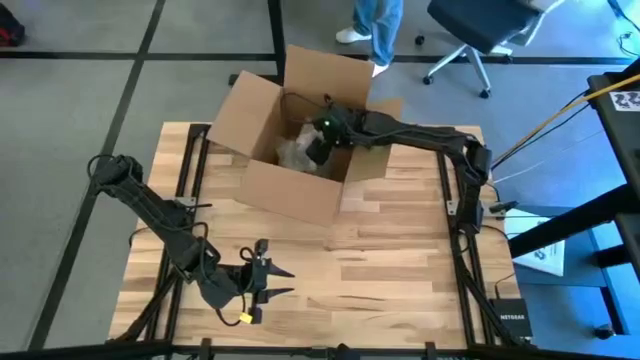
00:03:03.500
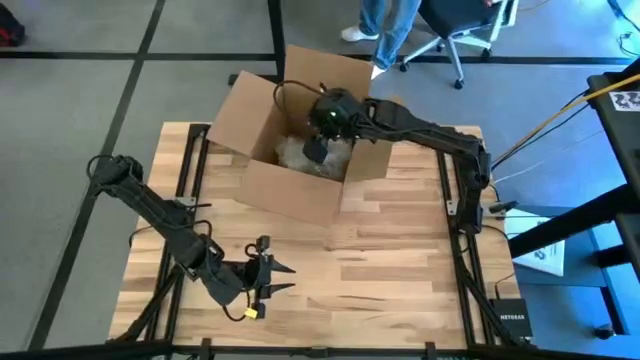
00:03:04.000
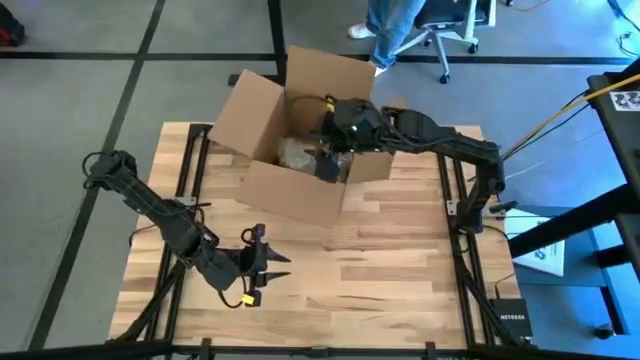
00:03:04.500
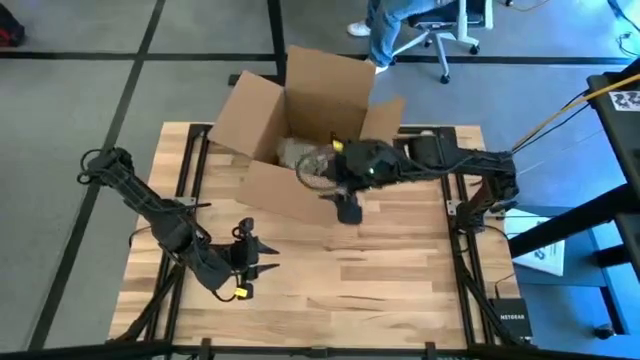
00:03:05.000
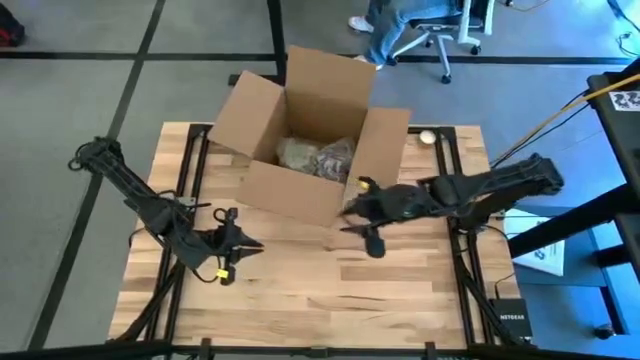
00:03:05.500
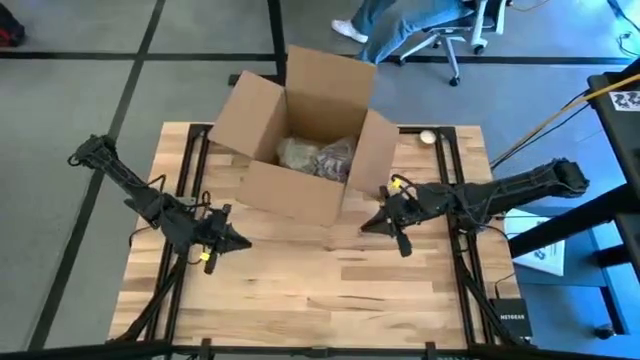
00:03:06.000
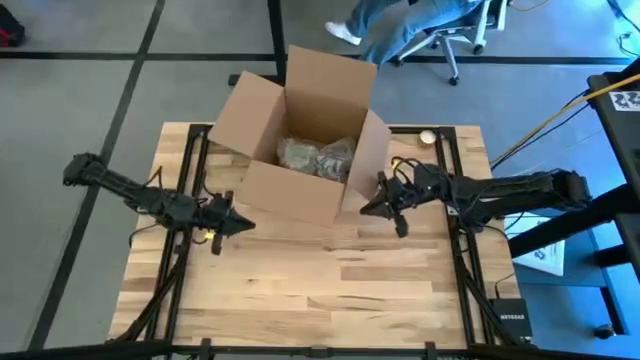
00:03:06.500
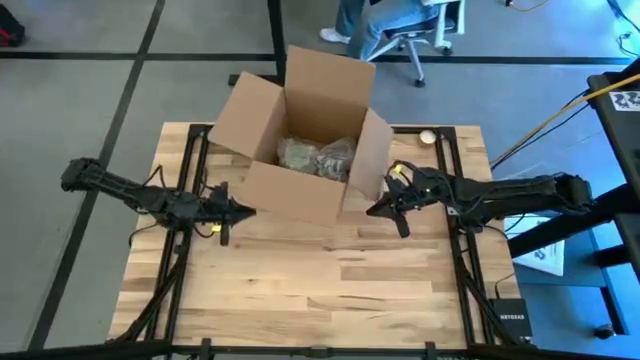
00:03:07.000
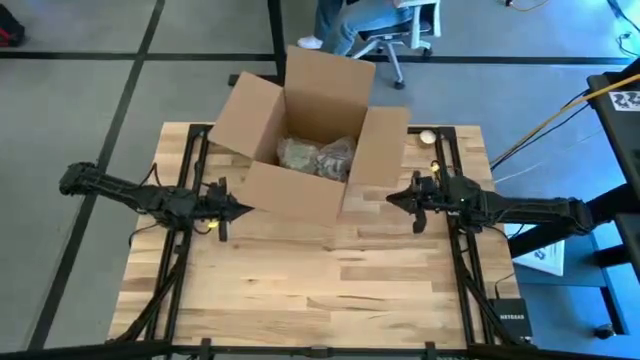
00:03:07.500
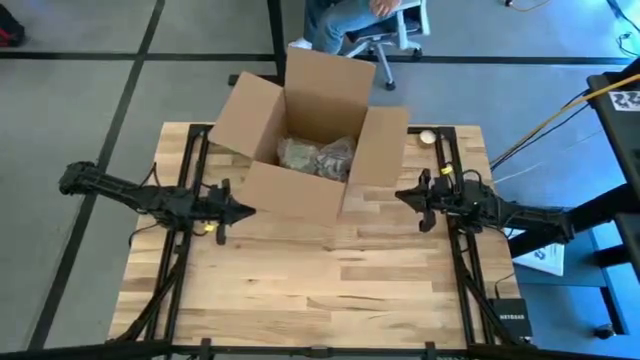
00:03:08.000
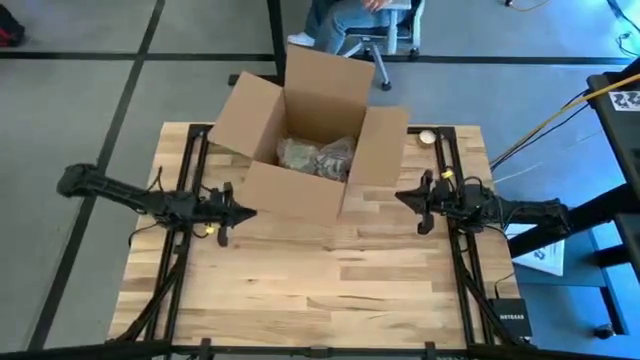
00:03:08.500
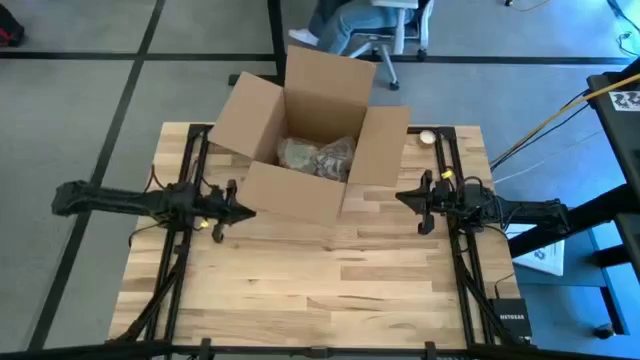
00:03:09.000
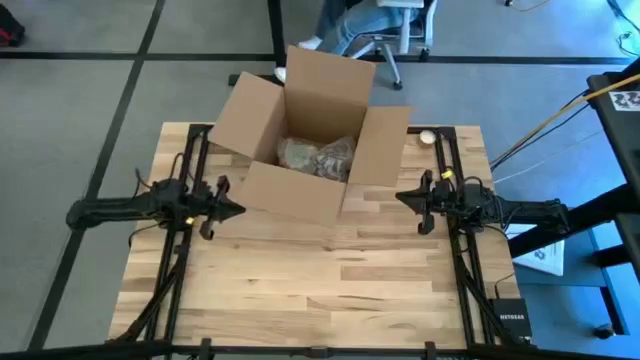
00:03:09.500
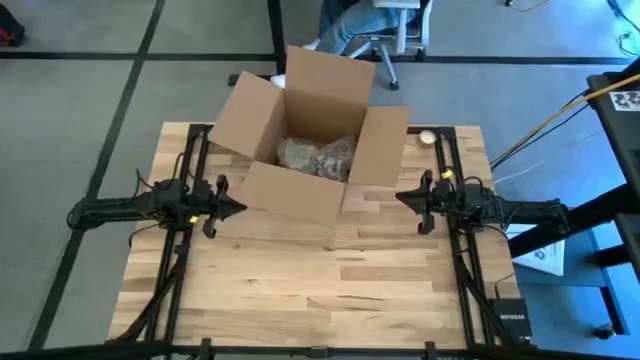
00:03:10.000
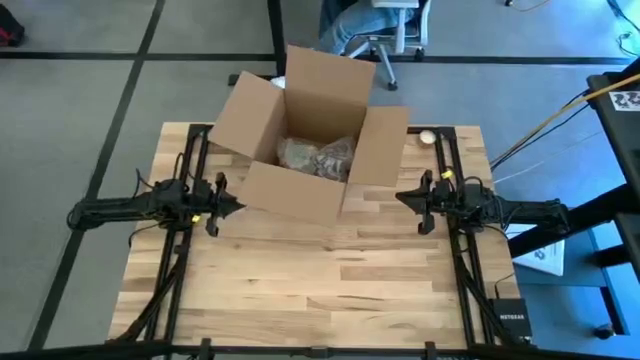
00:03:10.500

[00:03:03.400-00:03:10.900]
Task: wrap mug
Return to Home Position

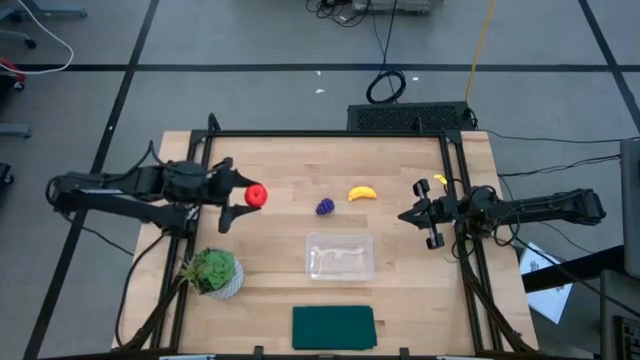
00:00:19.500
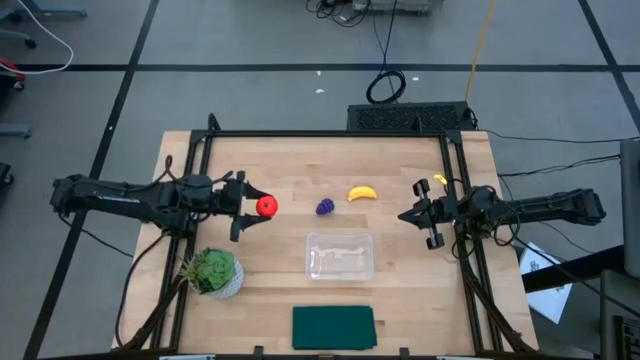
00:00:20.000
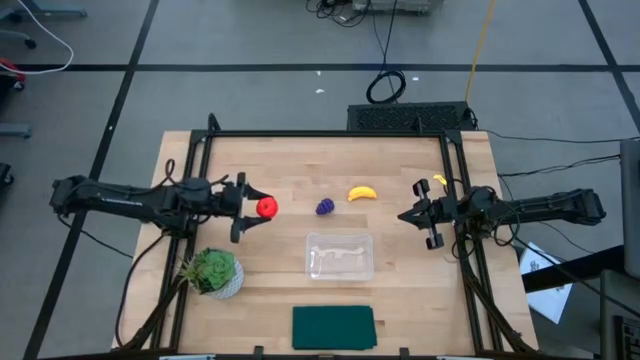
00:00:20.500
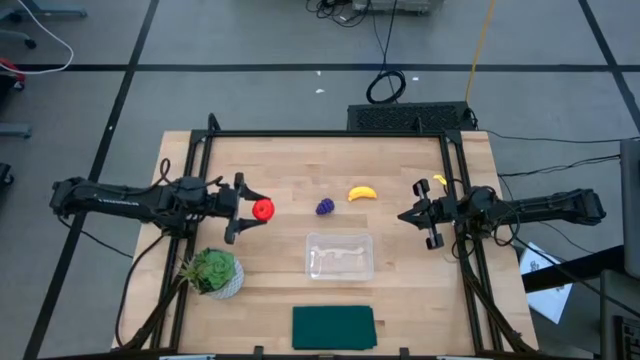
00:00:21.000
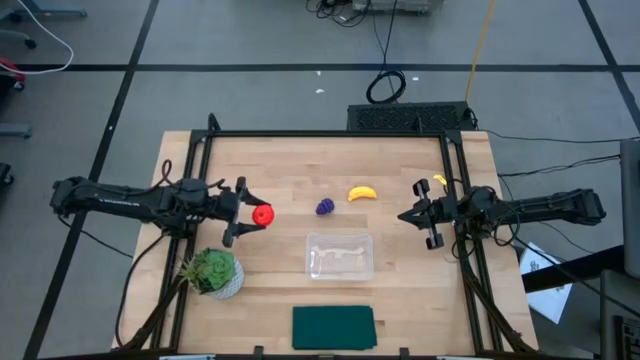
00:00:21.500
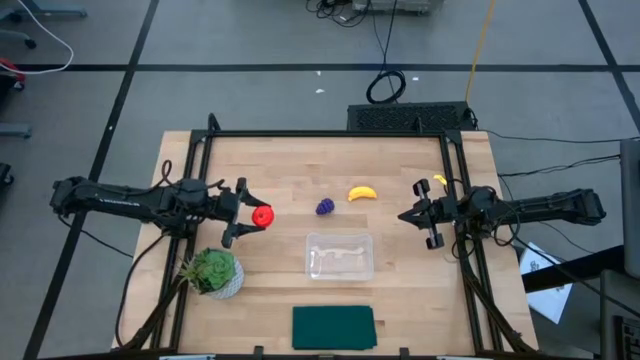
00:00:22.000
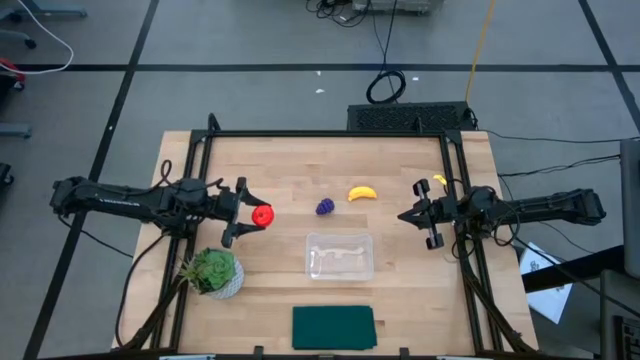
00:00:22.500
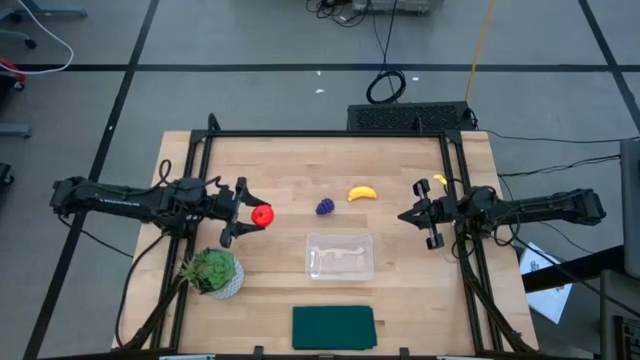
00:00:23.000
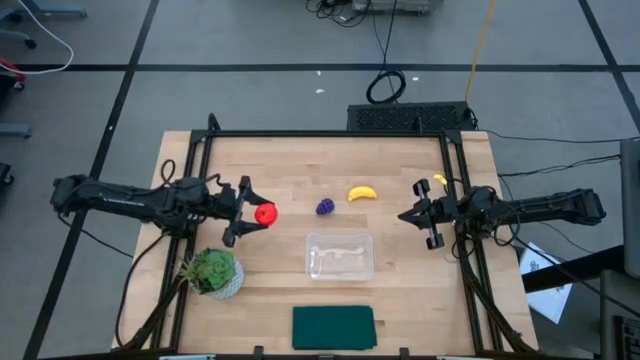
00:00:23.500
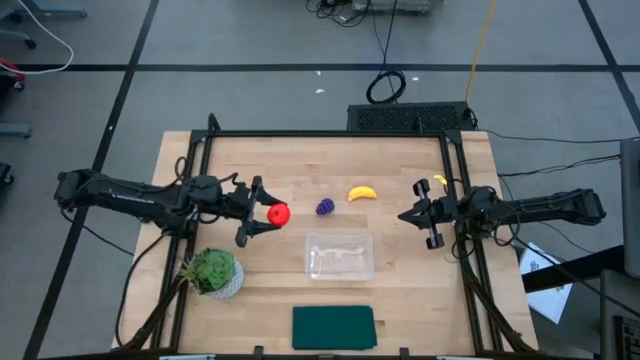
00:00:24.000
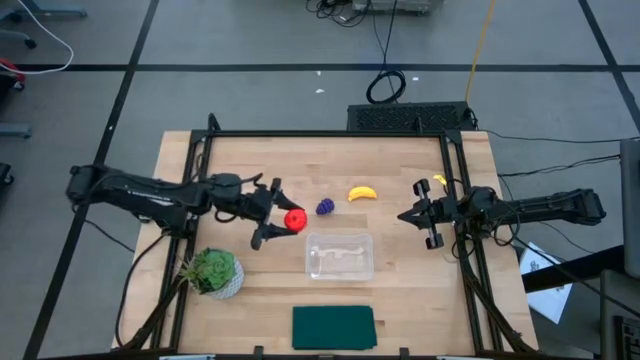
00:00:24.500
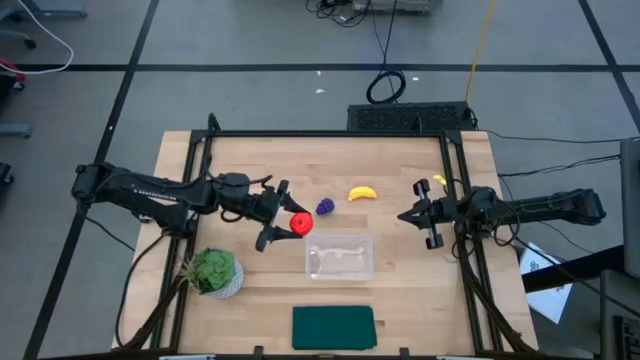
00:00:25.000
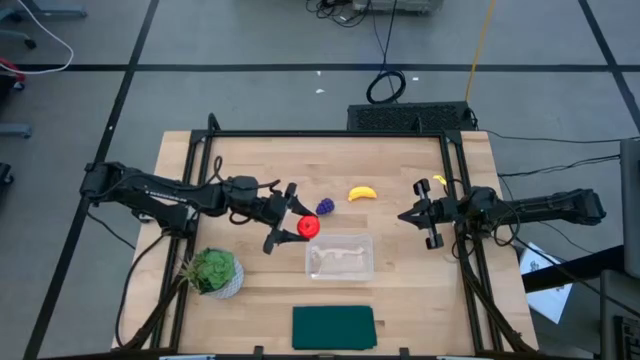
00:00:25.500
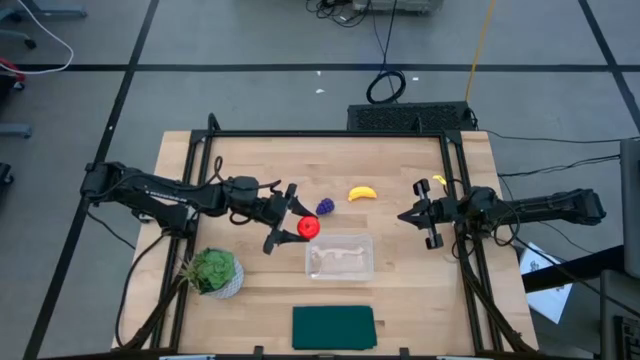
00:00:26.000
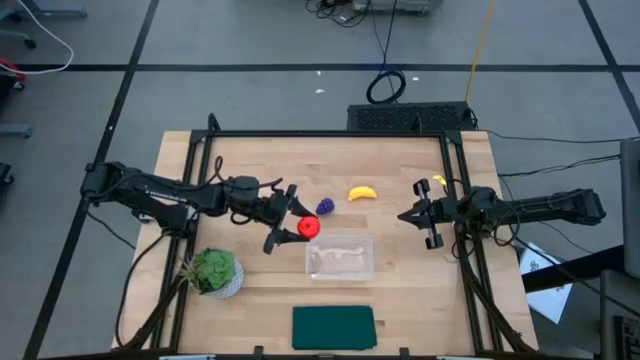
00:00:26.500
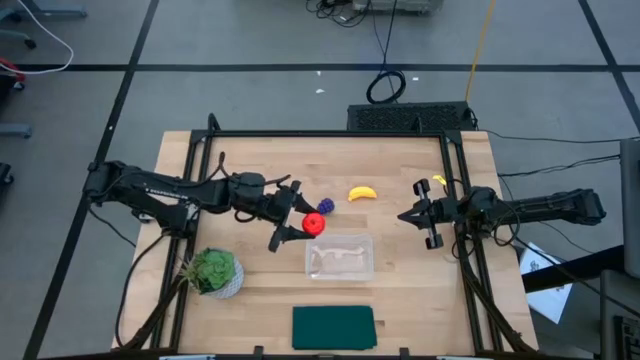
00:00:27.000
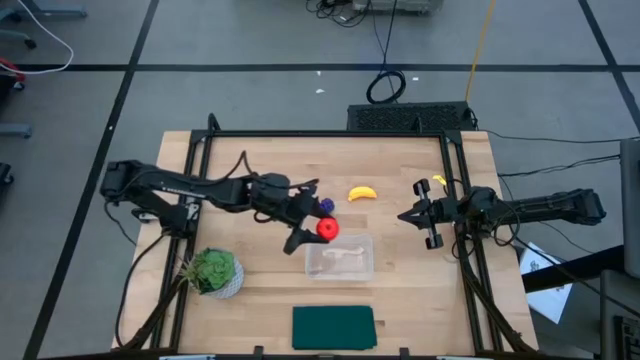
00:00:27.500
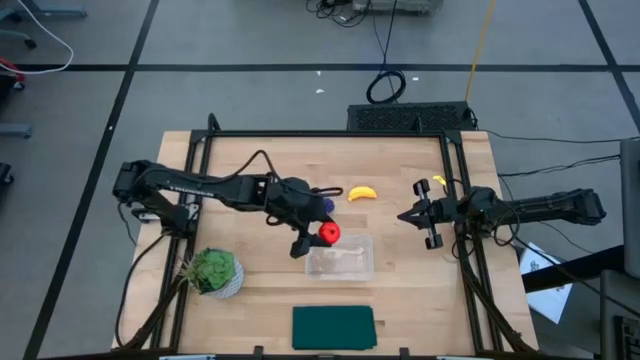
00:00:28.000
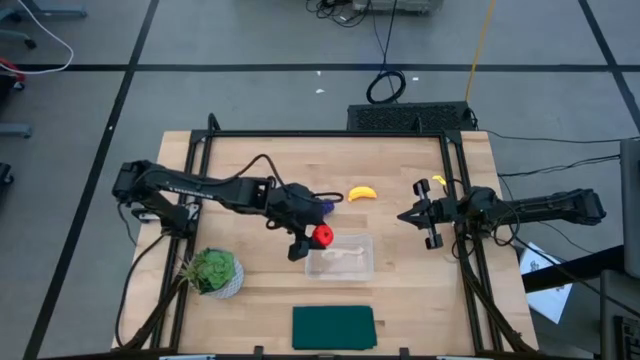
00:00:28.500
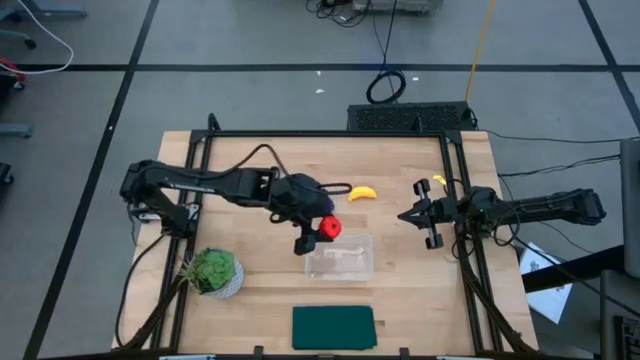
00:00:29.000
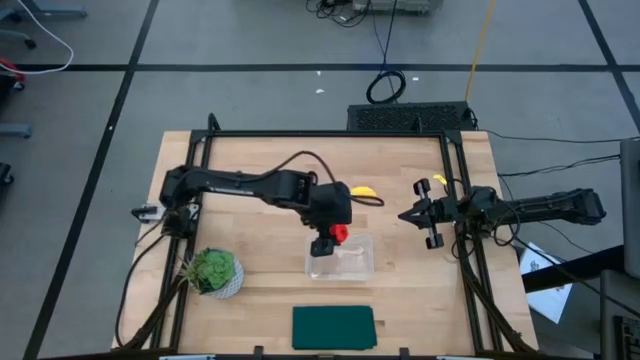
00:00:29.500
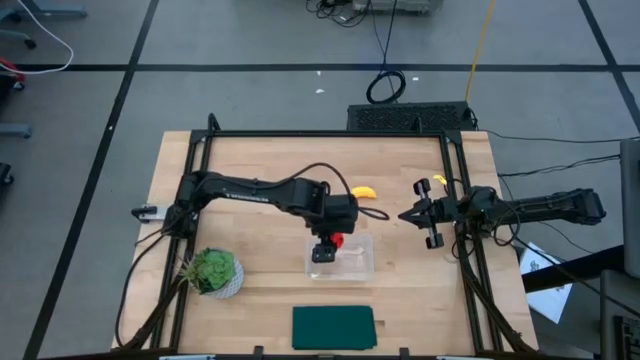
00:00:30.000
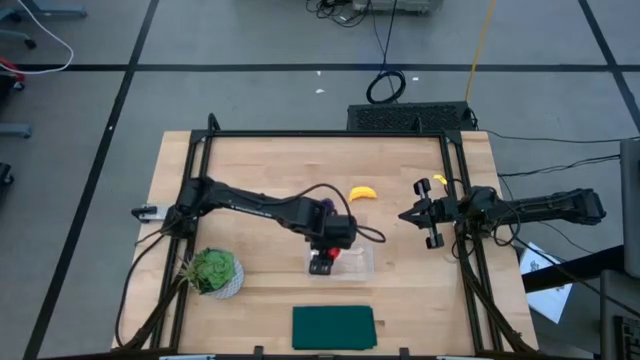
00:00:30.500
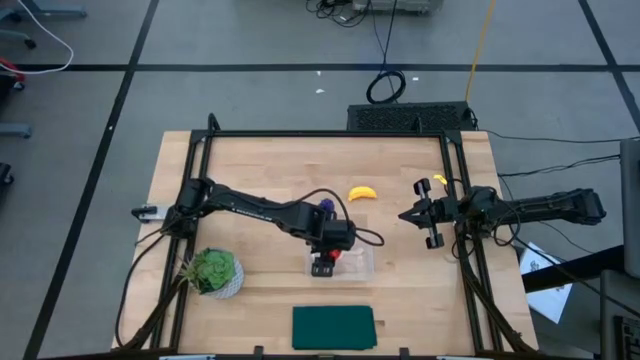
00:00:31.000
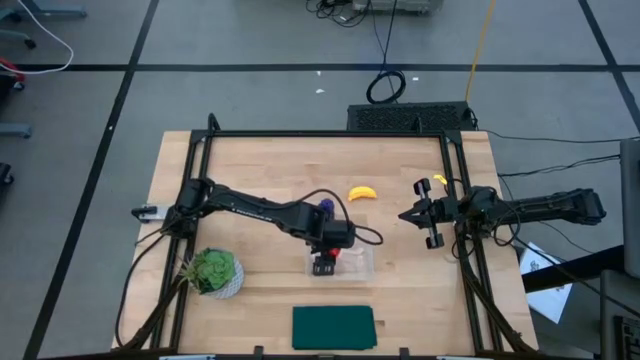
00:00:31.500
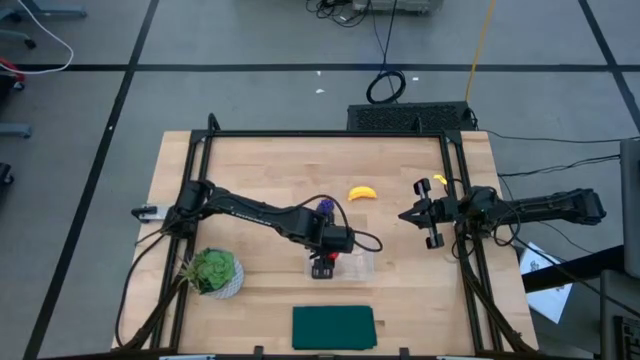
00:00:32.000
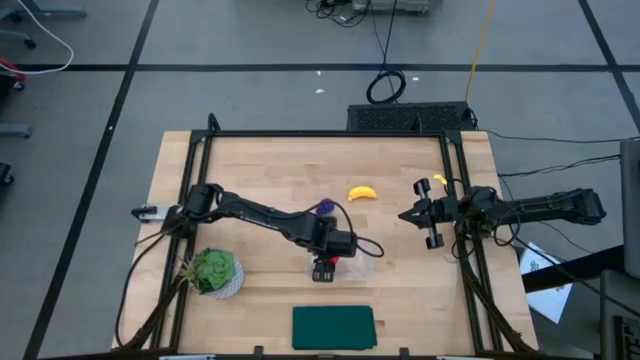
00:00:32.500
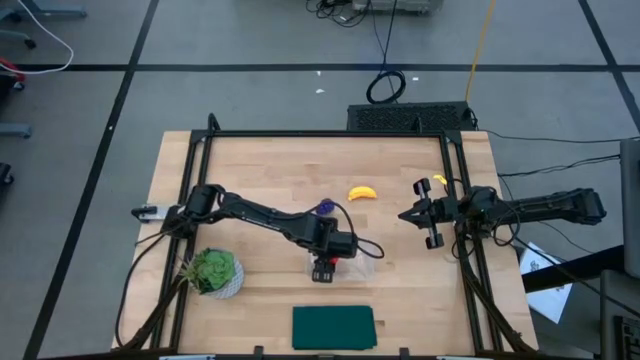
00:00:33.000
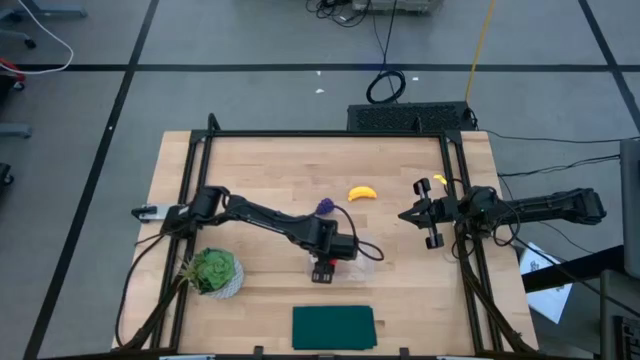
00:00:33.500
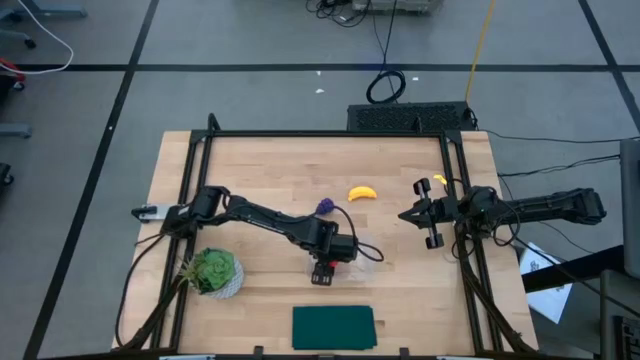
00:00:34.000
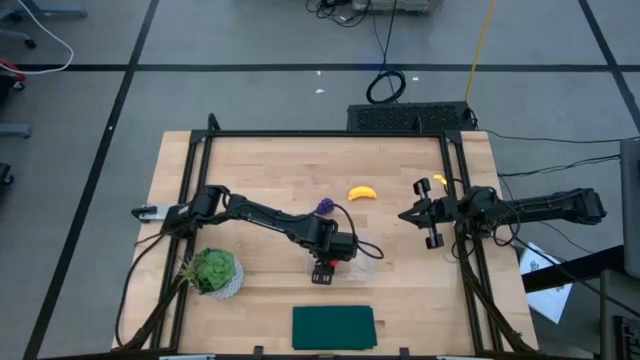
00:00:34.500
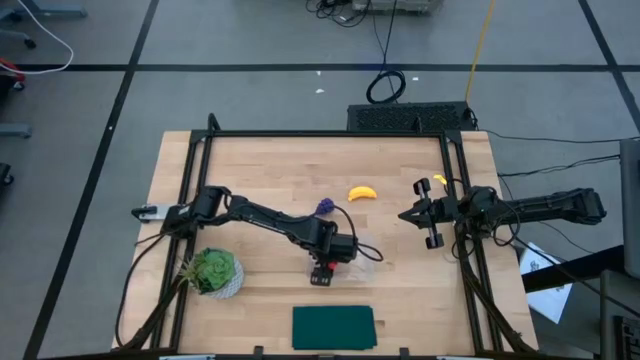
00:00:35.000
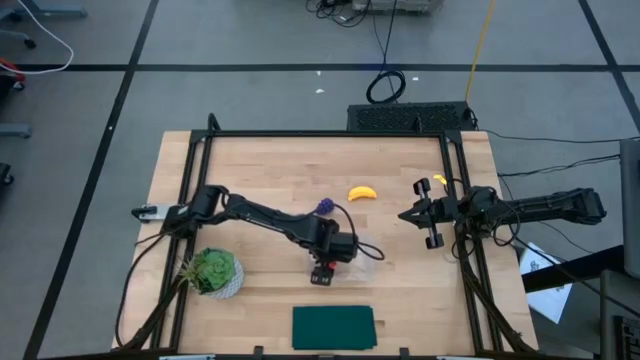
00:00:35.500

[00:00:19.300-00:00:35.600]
Task: Pick and placing Produce into tupperware
Put the apple into the transparent bin
